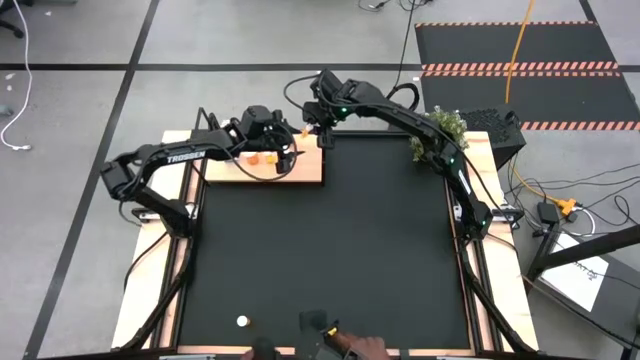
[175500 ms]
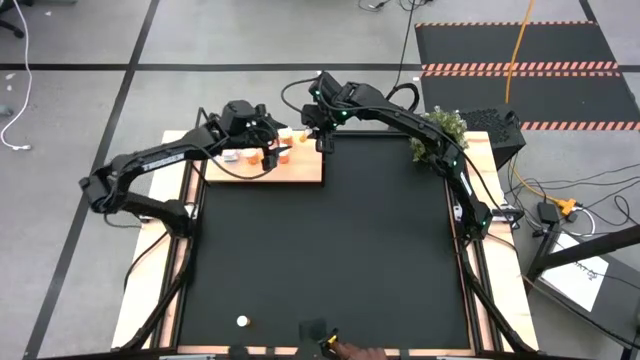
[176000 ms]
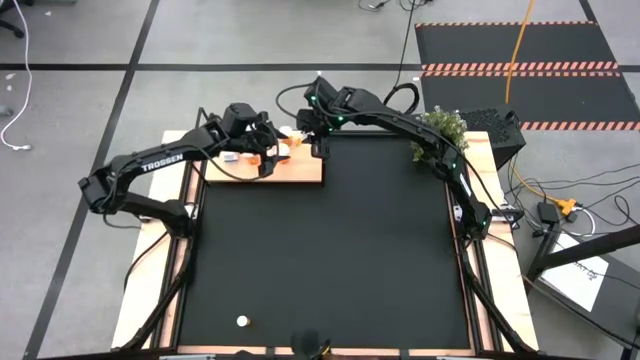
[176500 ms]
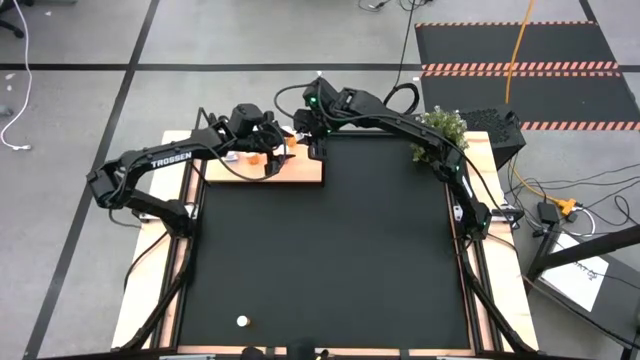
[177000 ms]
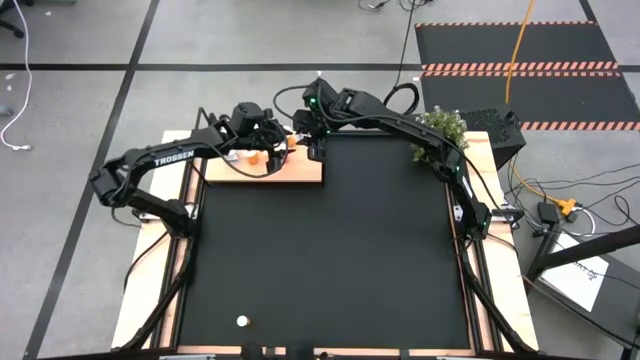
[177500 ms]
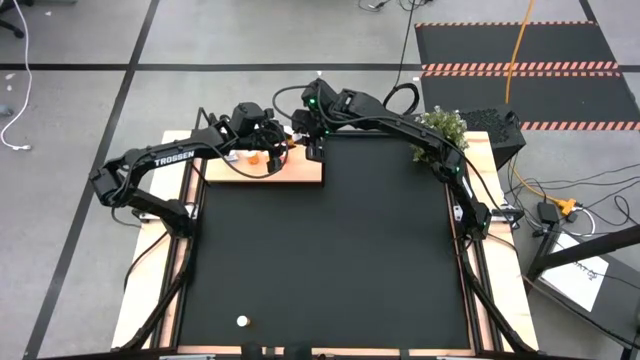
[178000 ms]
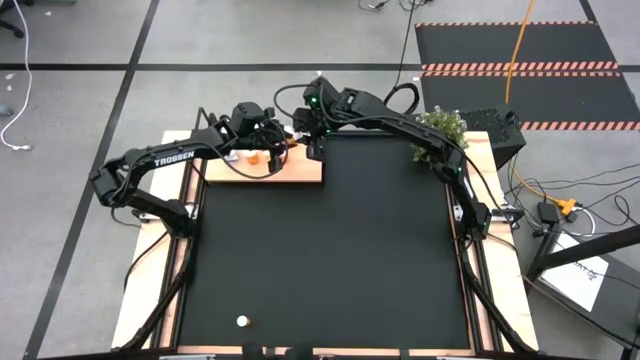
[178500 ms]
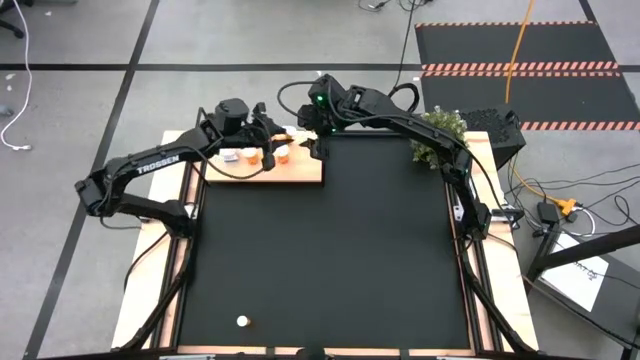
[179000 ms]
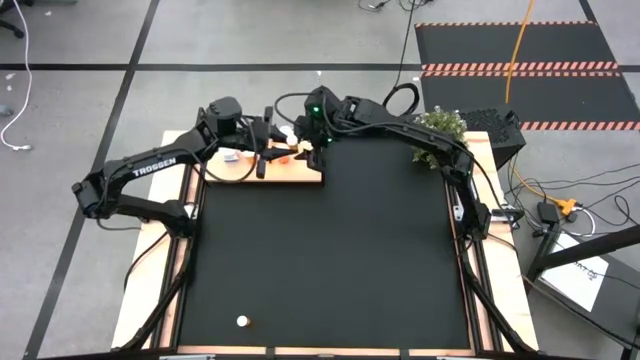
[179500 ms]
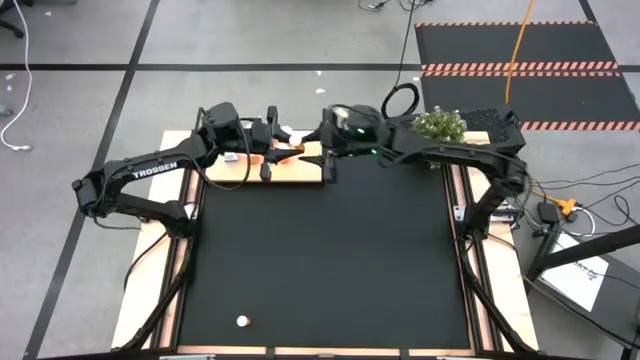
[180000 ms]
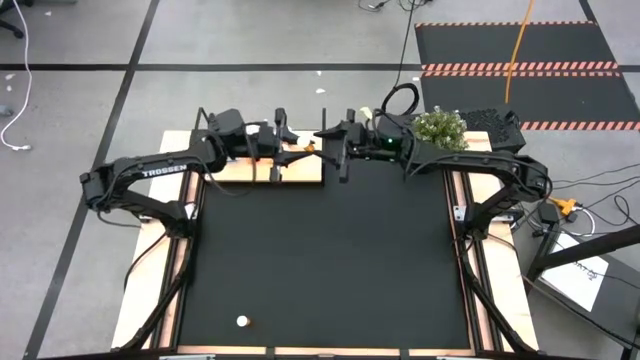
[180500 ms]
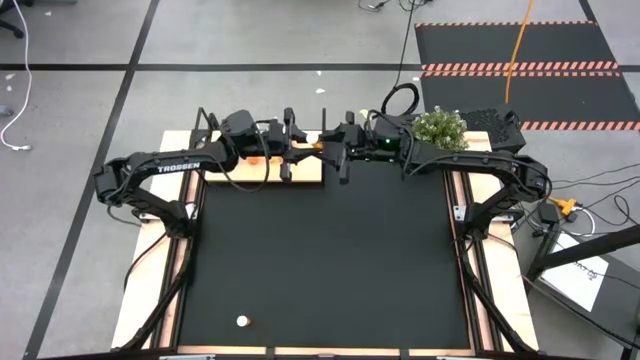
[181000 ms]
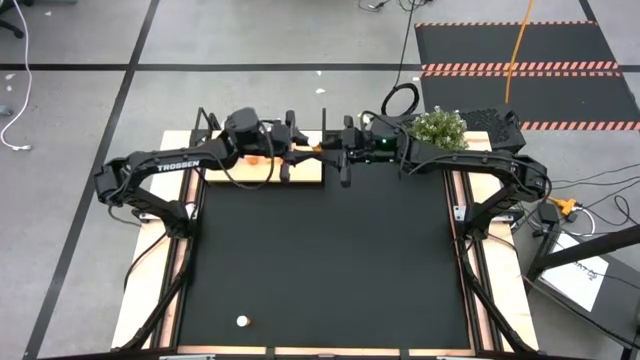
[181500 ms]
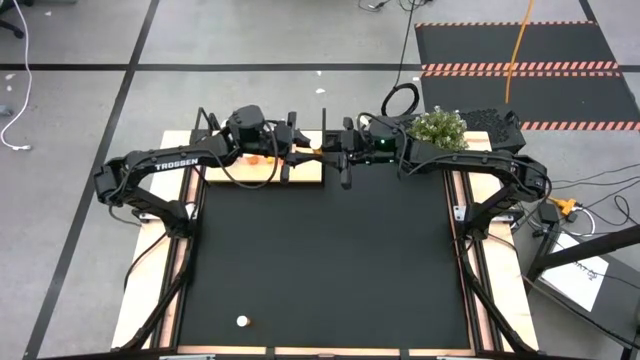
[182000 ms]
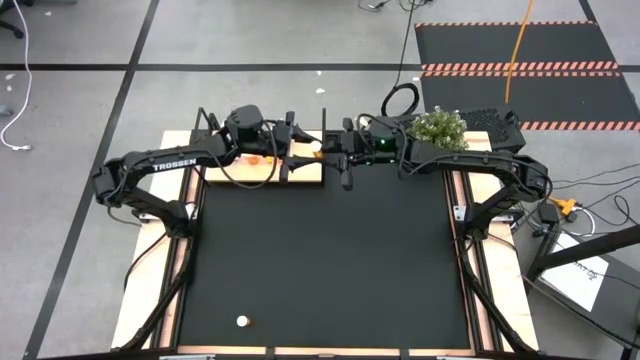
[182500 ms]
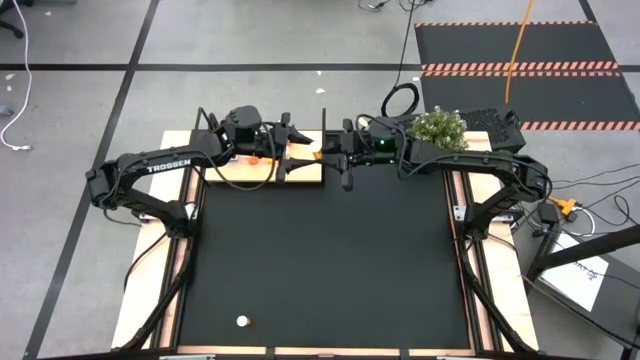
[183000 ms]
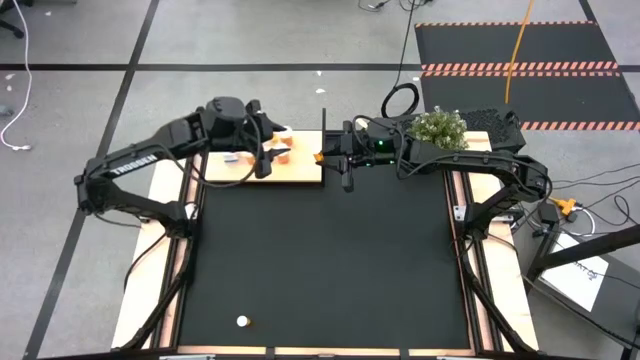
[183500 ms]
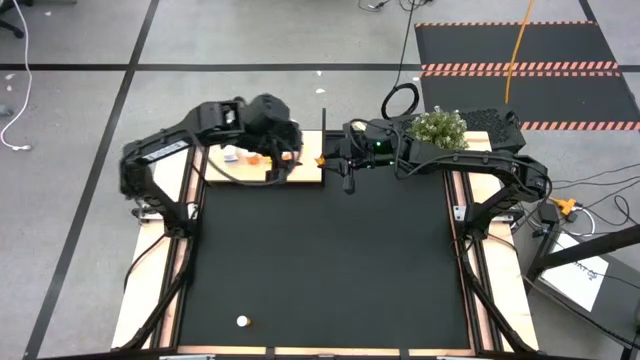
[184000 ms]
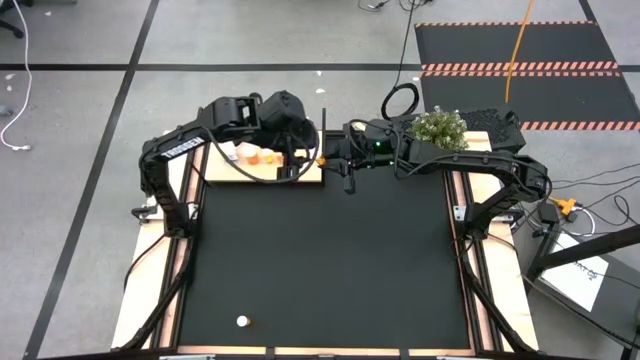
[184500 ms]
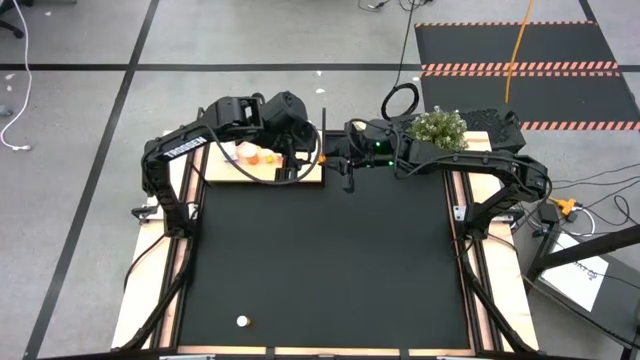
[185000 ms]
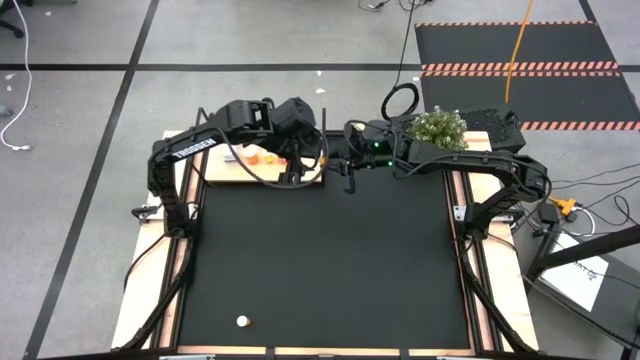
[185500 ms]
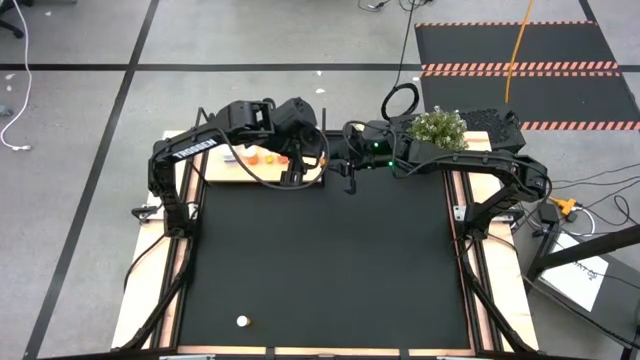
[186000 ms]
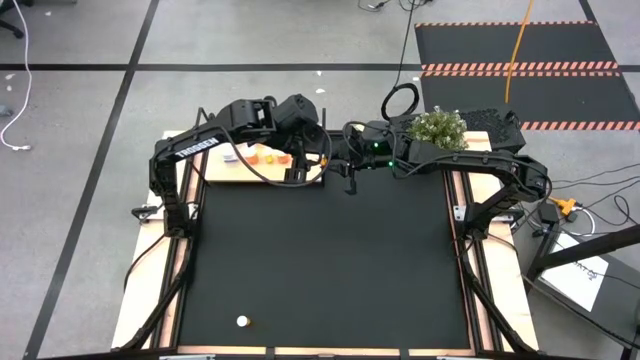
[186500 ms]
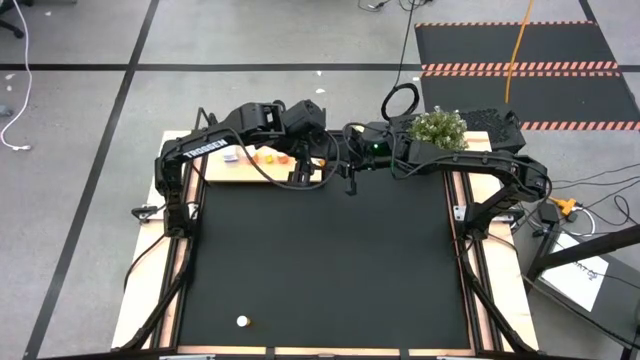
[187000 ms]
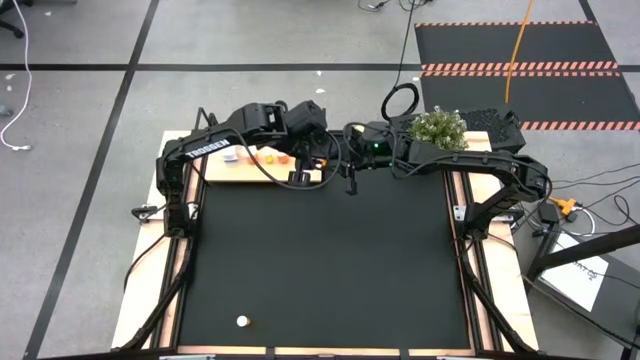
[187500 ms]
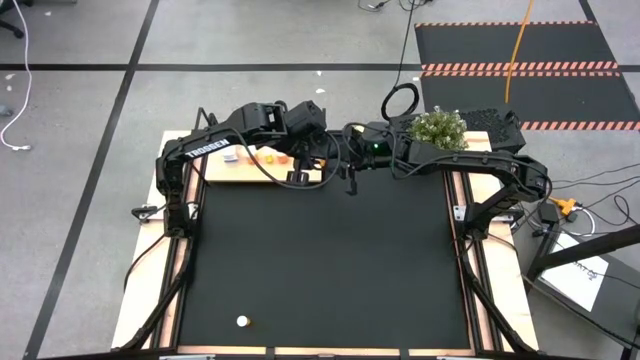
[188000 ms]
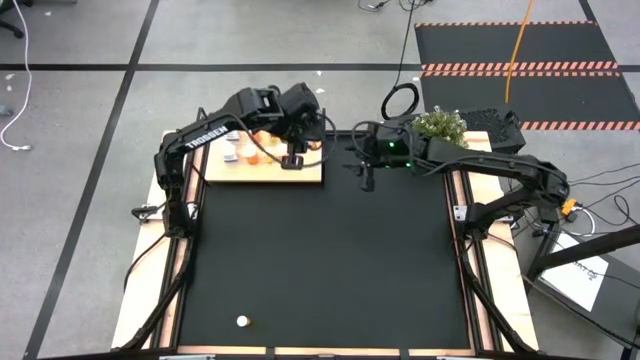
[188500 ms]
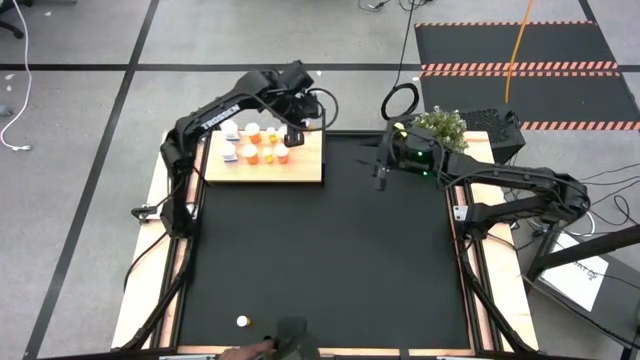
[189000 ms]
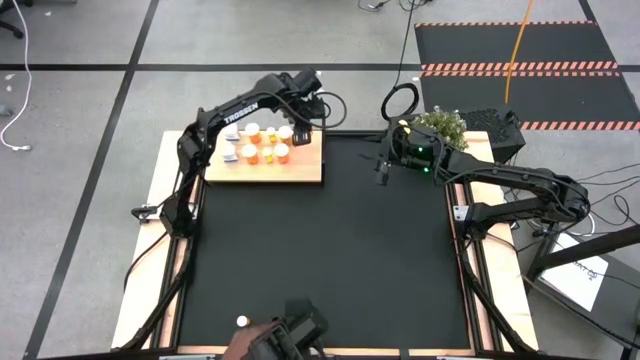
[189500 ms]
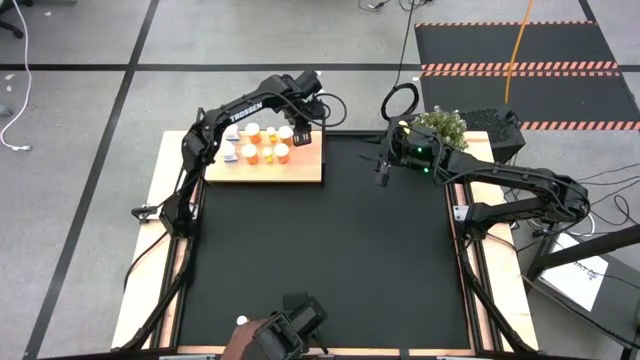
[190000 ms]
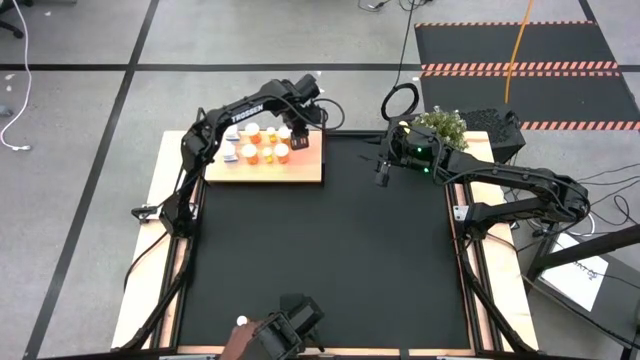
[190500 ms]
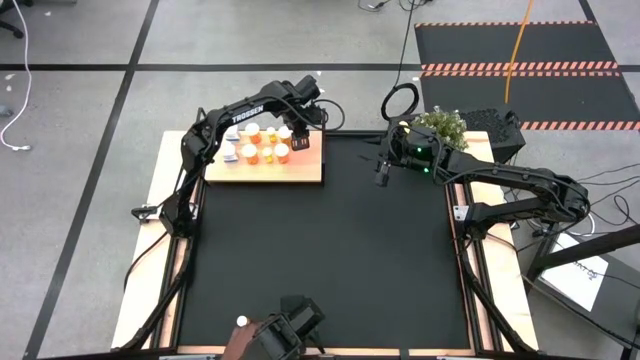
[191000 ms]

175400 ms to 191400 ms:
Task: Pick and place medicine bottles onto shelf by color
Put the small orange pill bottle on the shelf

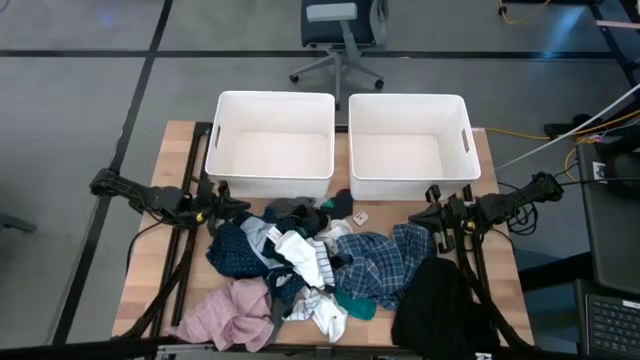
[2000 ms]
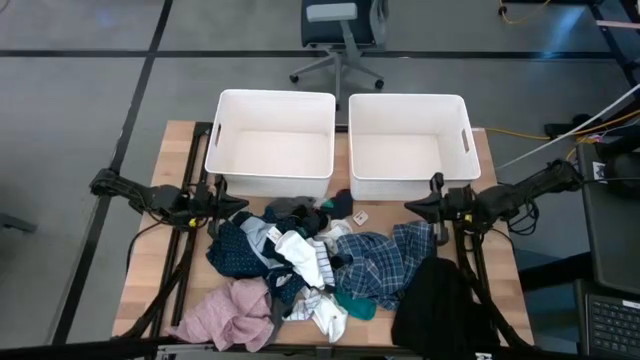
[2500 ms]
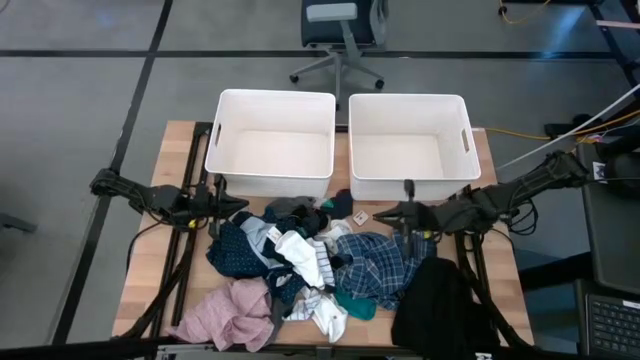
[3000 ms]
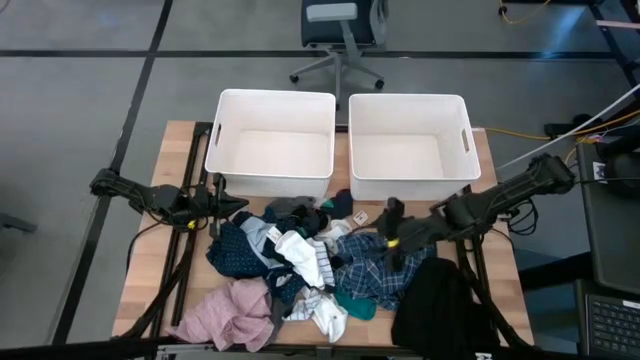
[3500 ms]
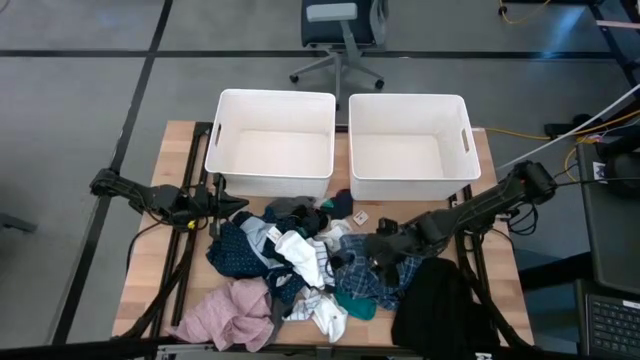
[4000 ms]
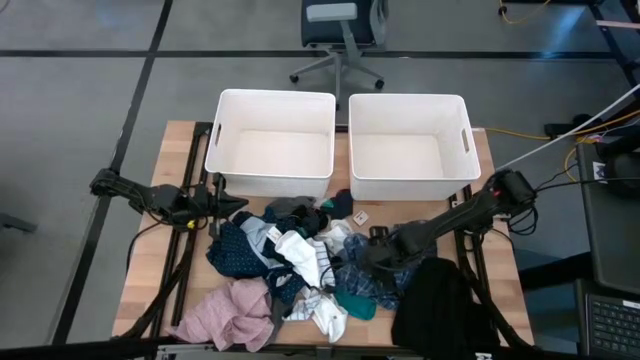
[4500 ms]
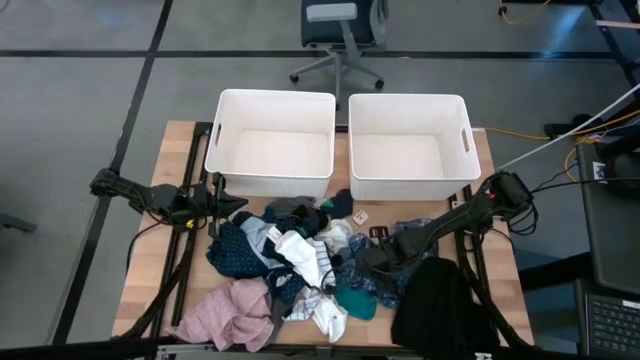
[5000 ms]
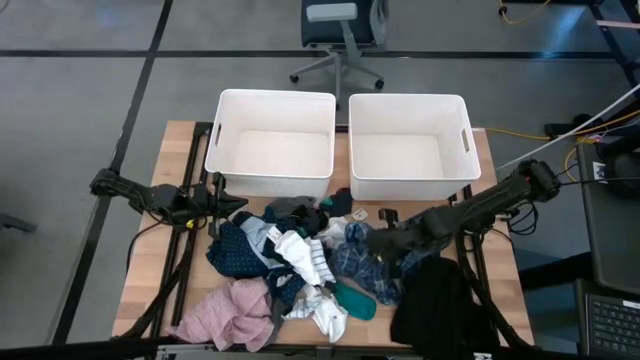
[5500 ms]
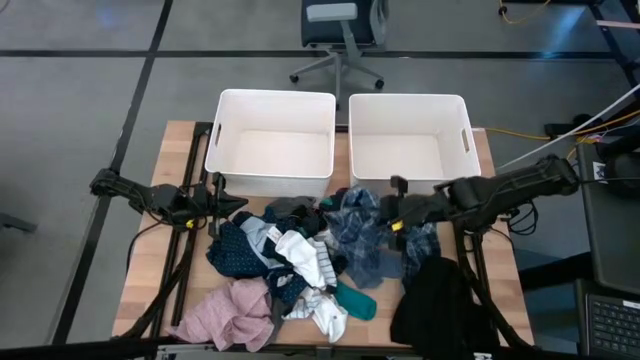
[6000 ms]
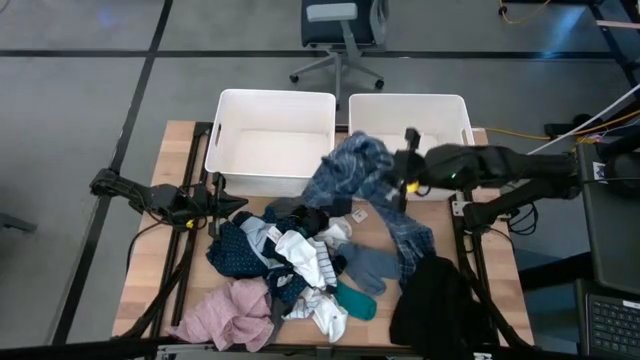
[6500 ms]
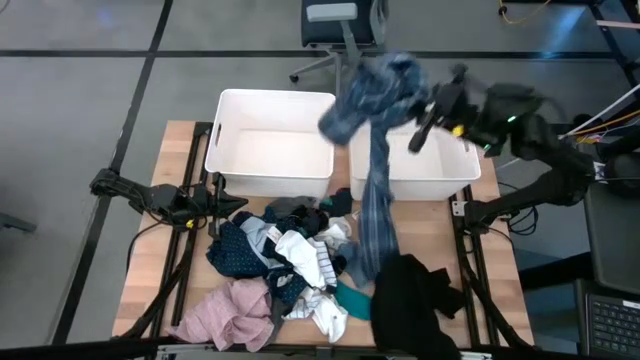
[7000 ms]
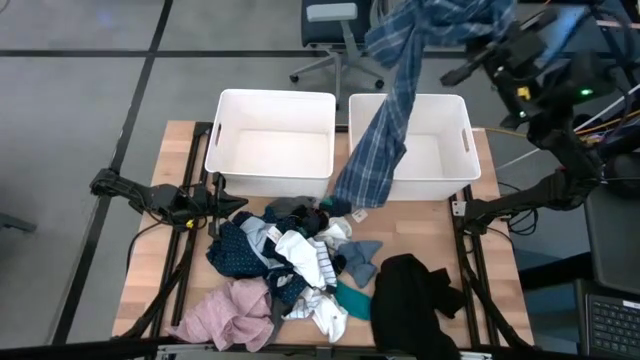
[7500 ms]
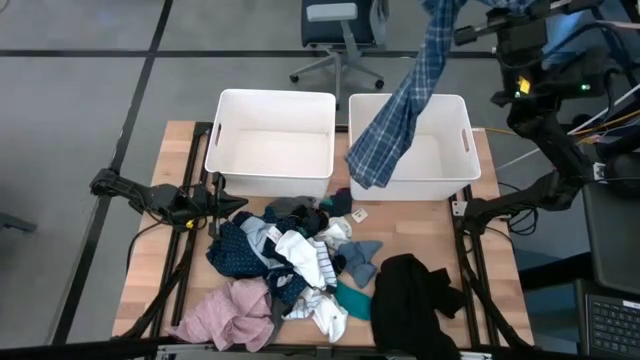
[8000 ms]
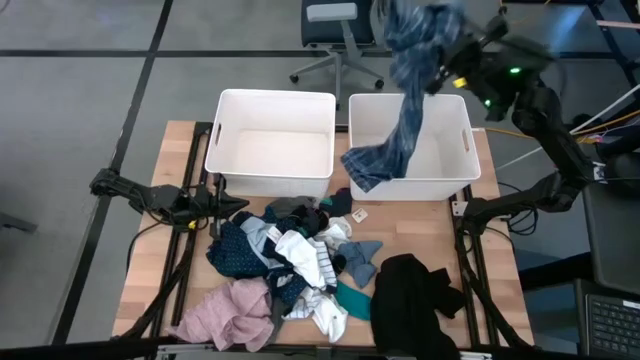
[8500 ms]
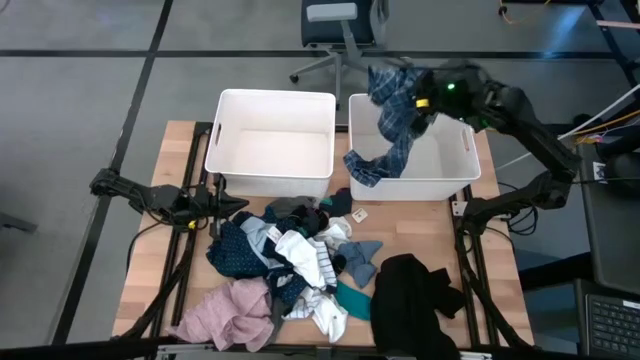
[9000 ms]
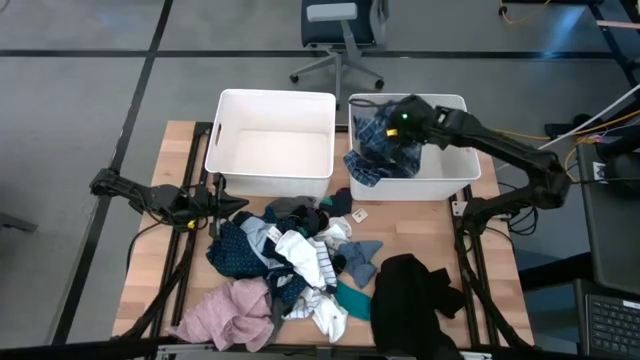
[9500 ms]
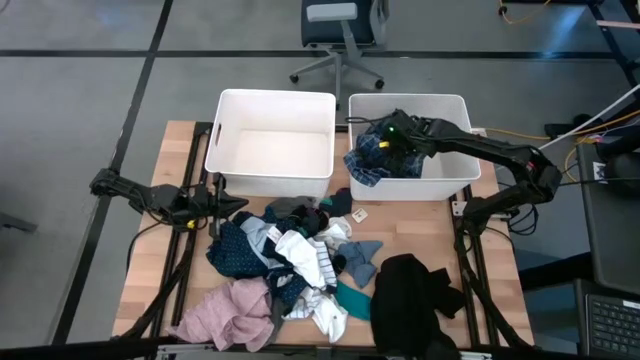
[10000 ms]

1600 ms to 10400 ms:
Task: Sort clothes
Put the blue pants into the right white bin
